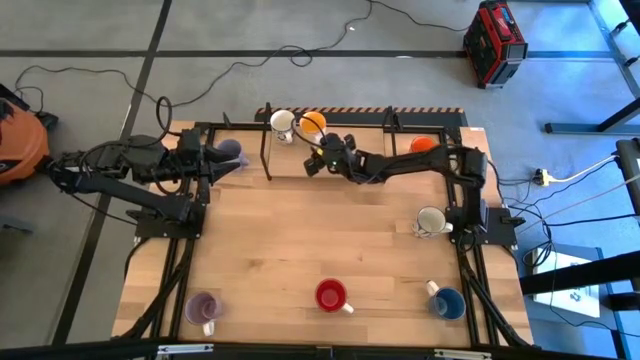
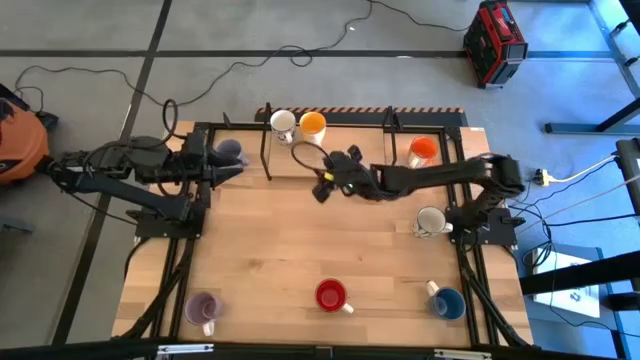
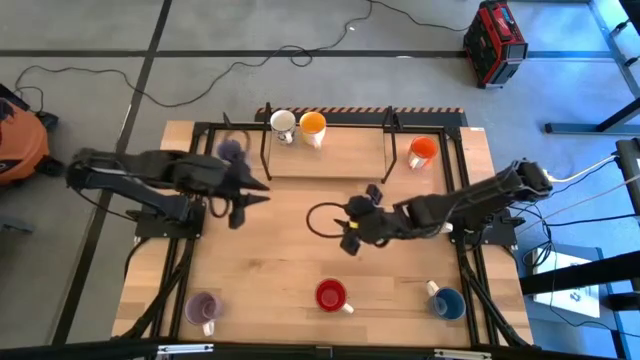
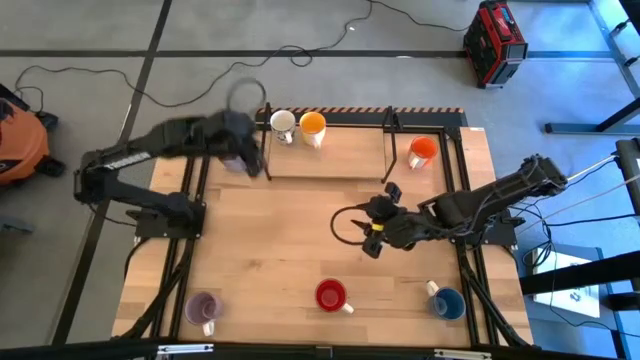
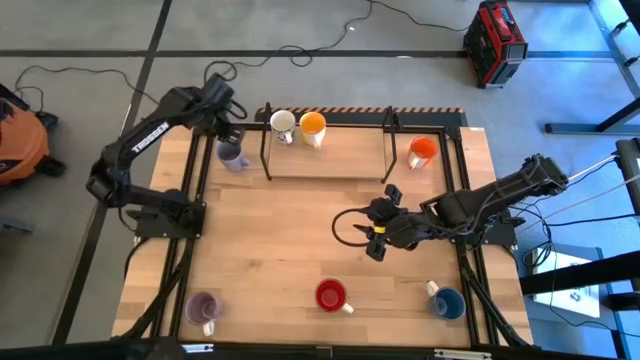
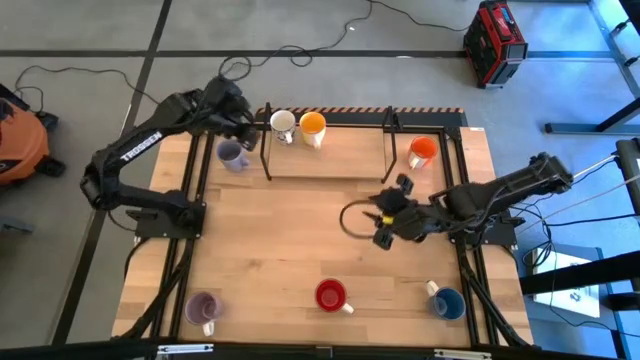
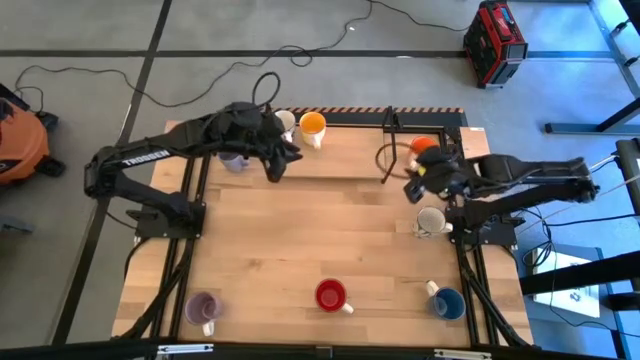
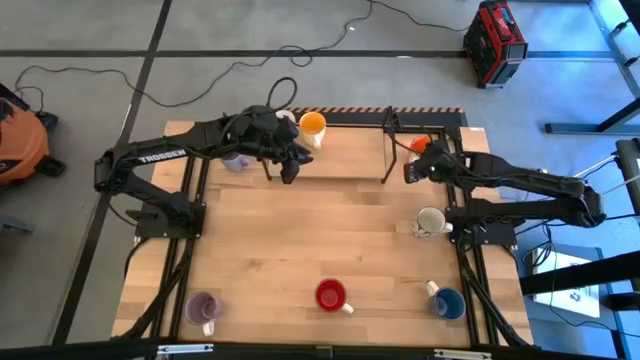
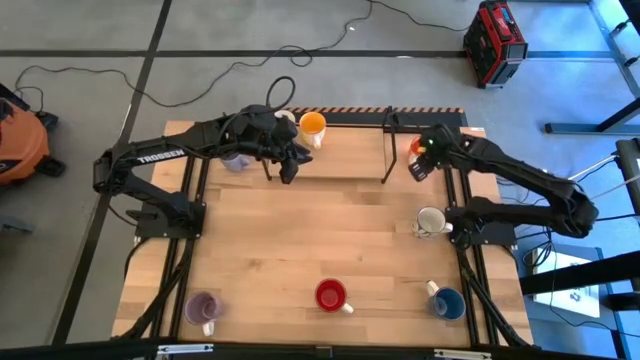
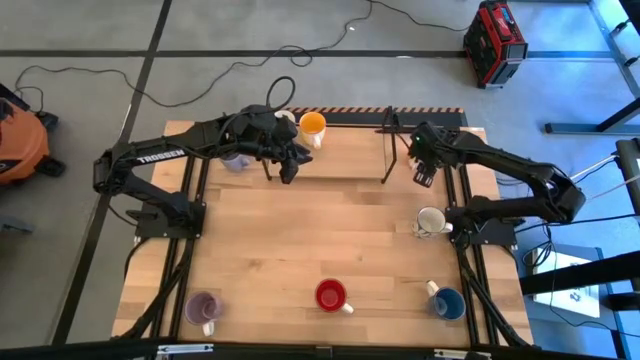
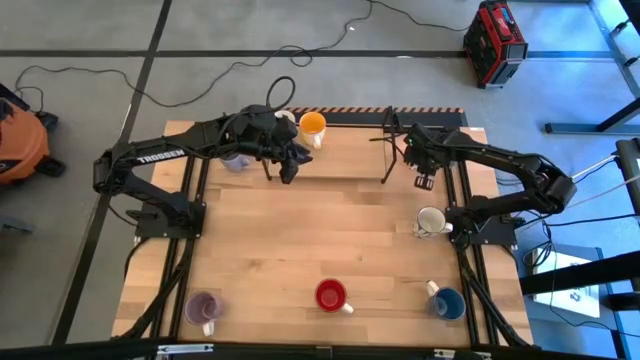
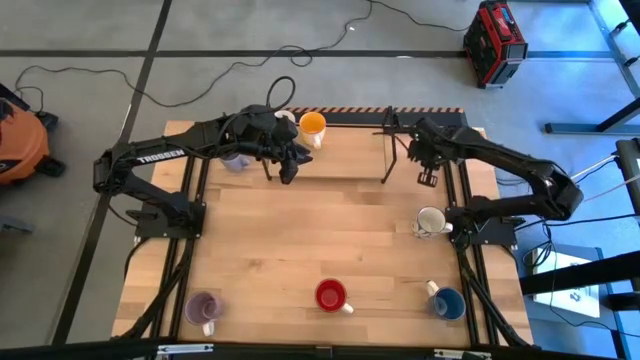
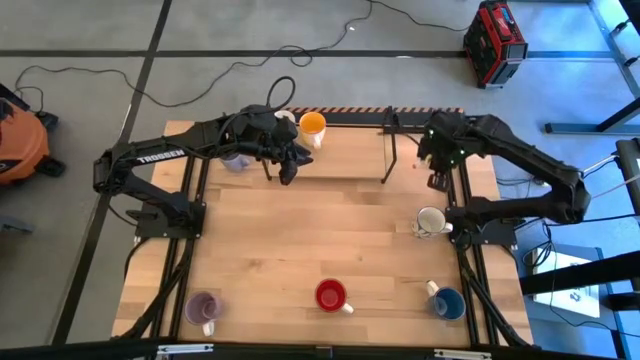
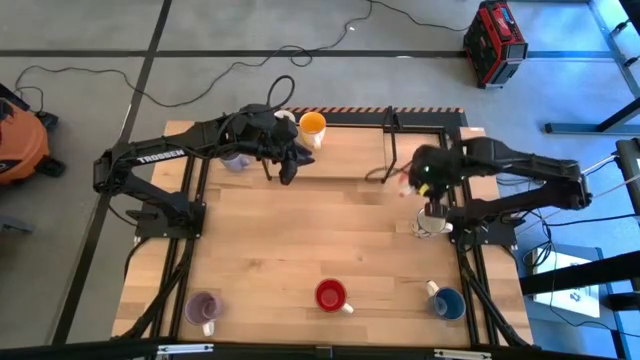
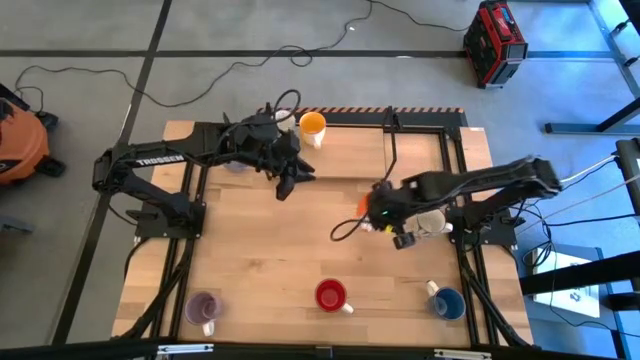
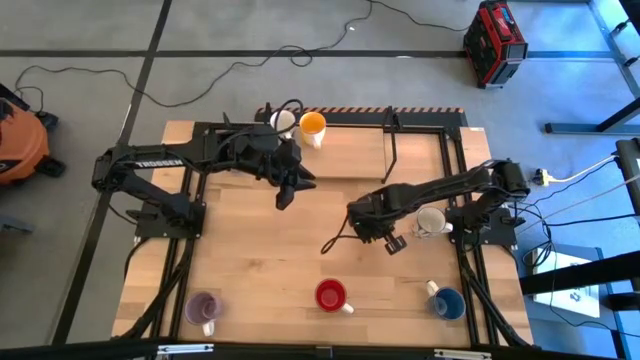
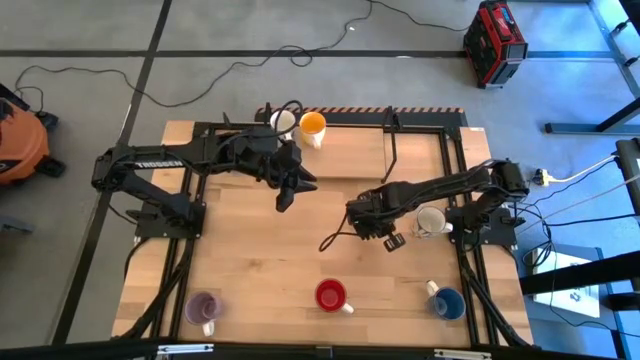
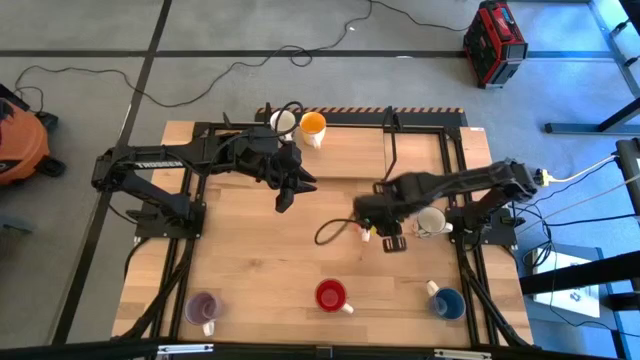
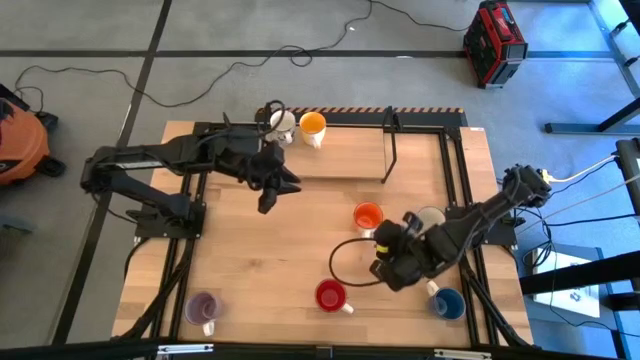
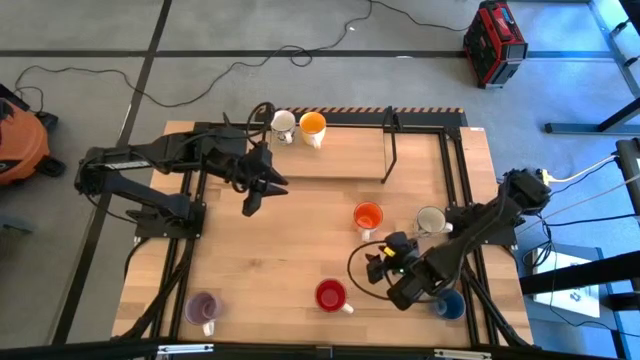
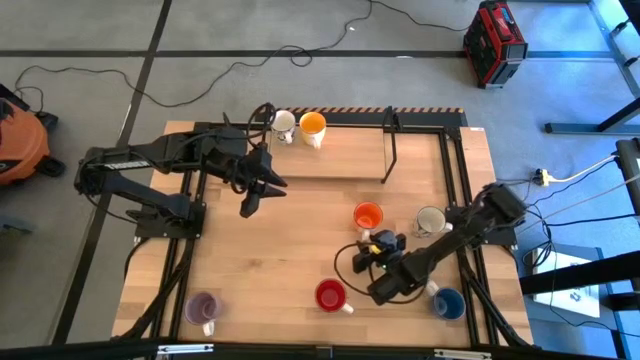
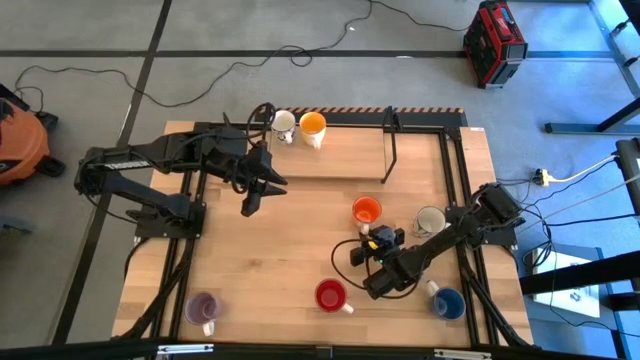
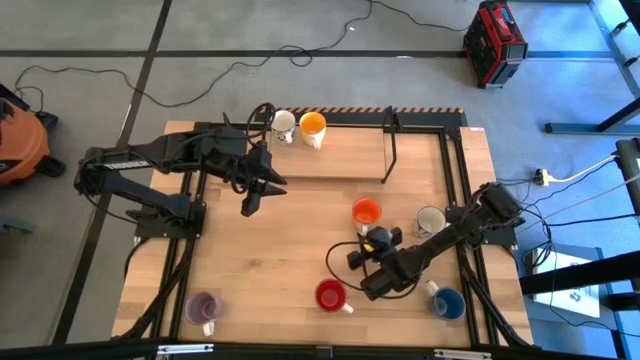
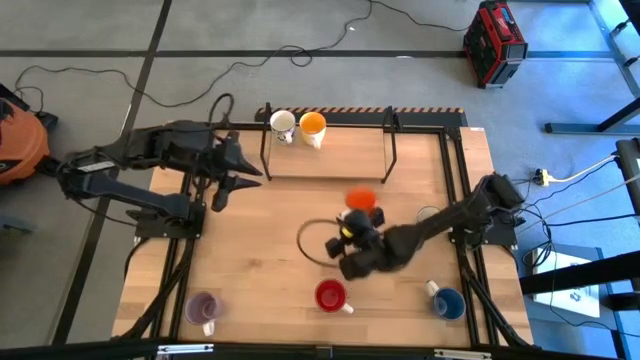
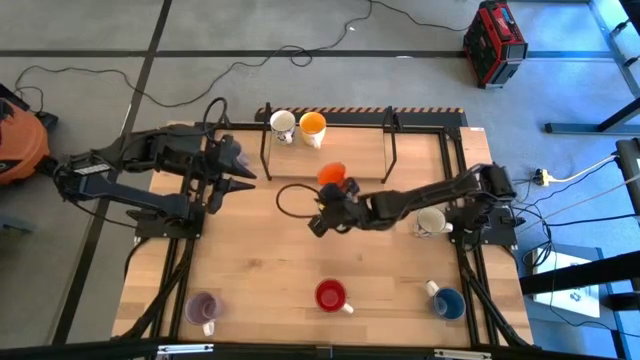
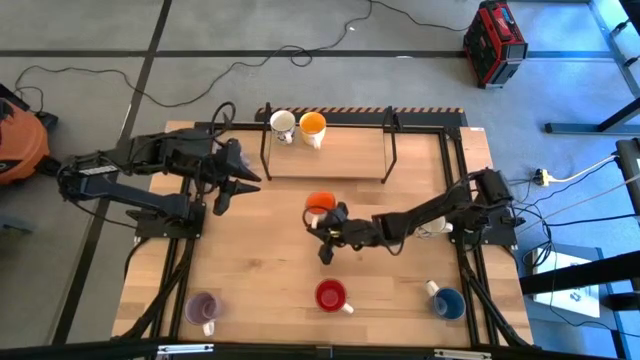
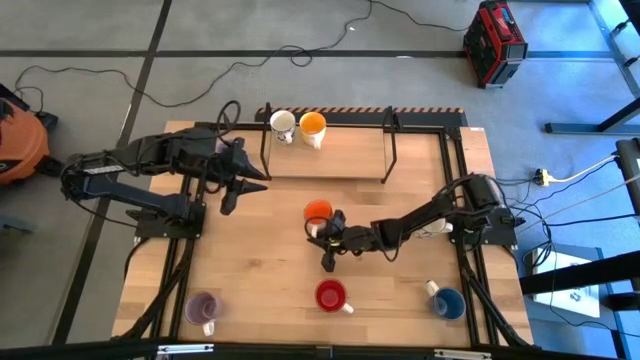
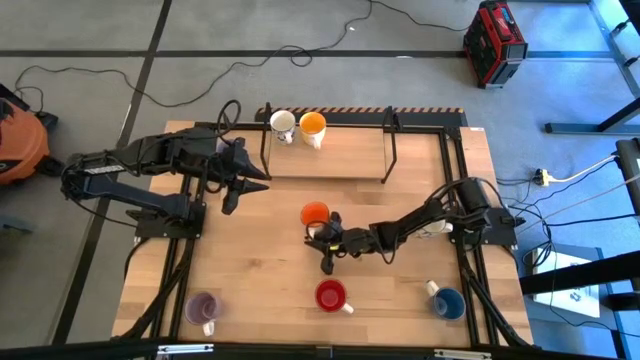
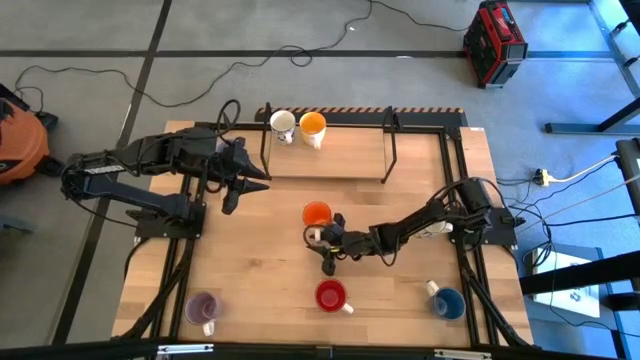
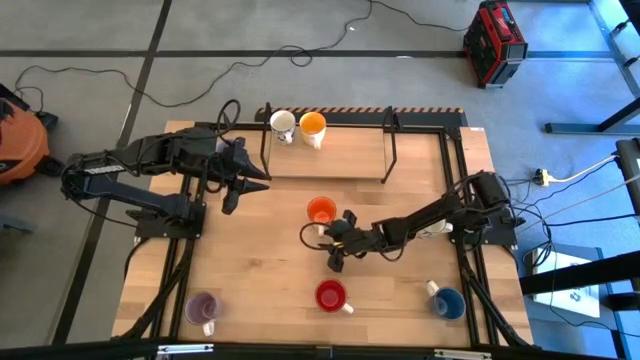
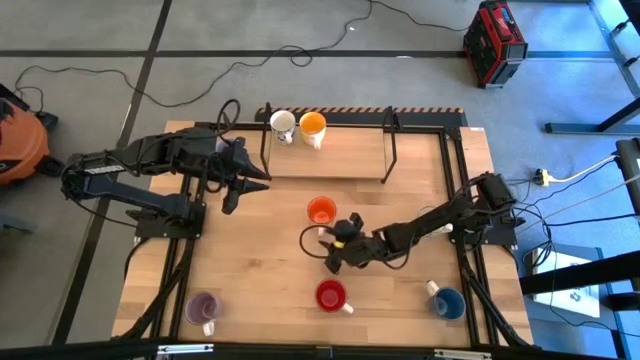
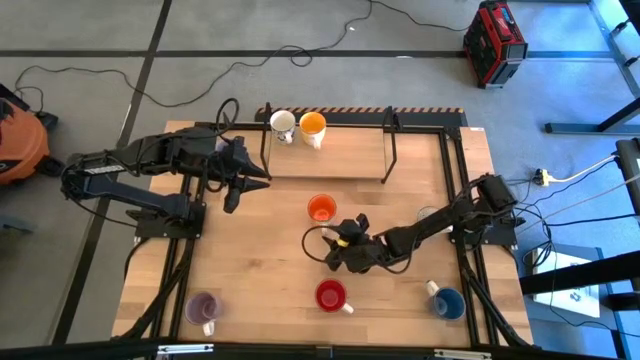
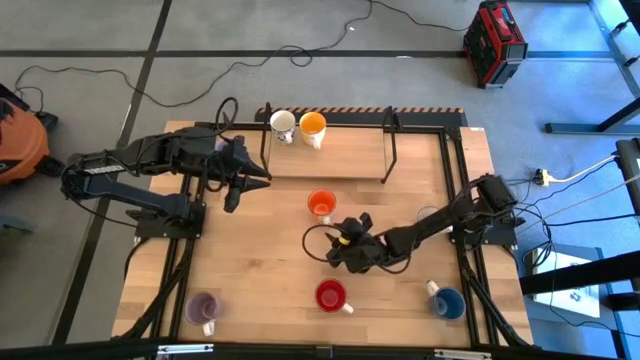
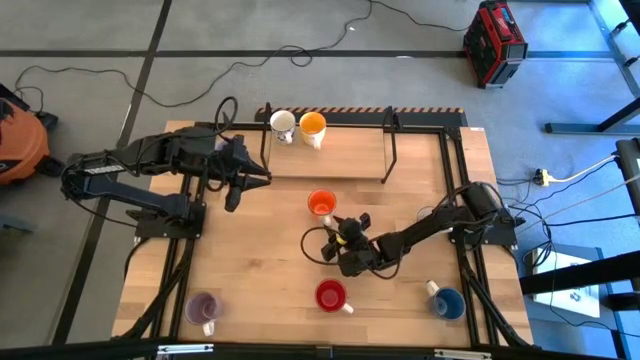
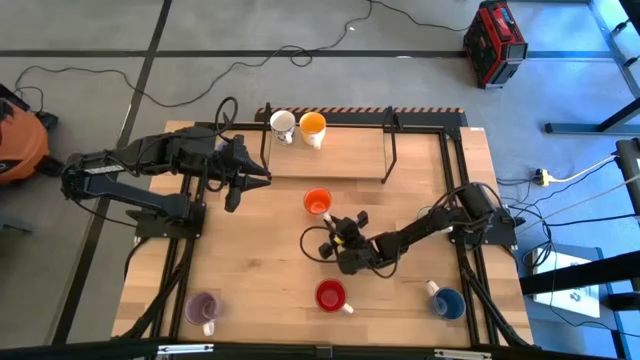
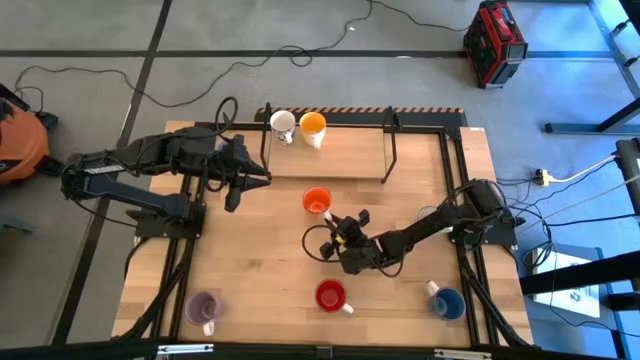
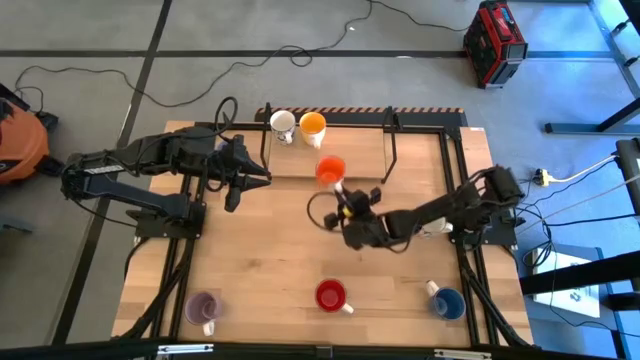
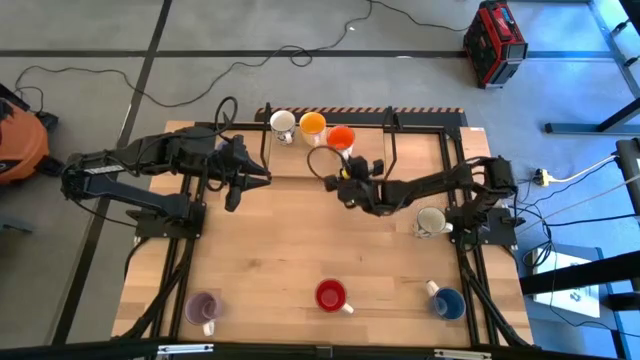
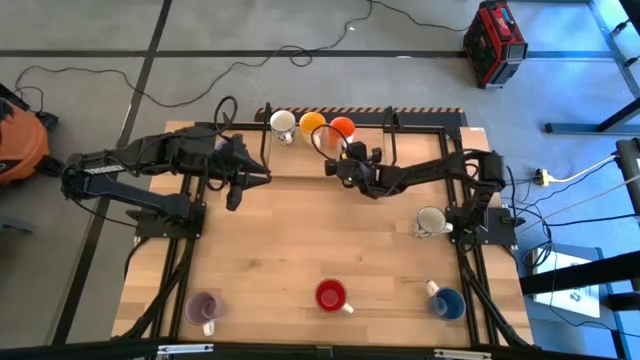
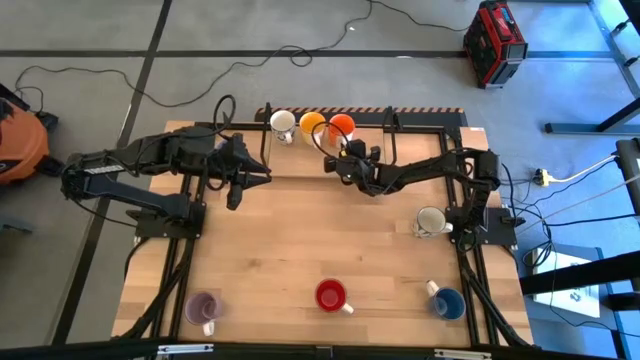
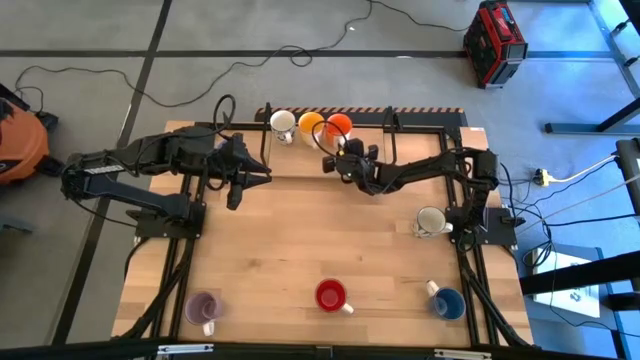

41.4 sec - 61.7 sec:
Task: Place coffee mugs
Put the orange mug on the shelf
